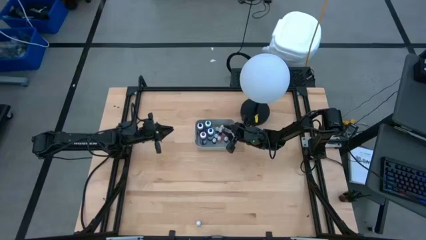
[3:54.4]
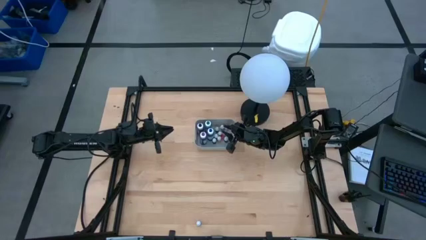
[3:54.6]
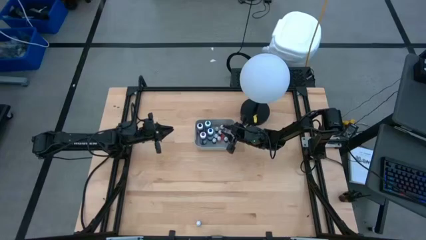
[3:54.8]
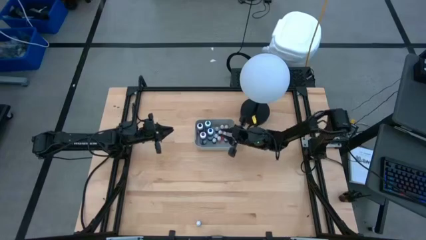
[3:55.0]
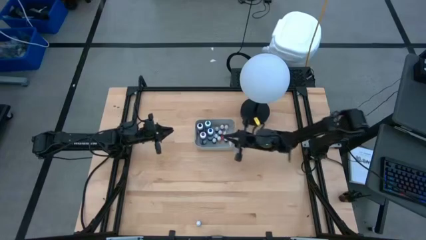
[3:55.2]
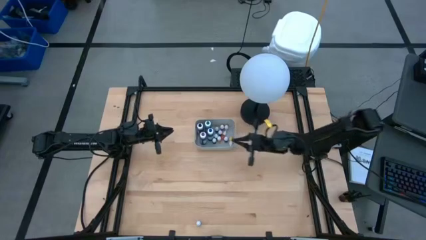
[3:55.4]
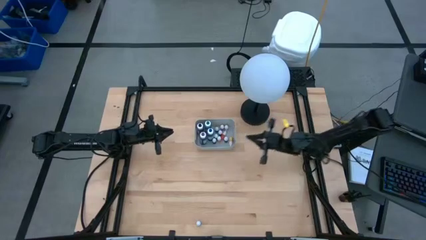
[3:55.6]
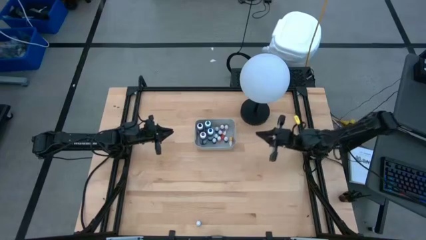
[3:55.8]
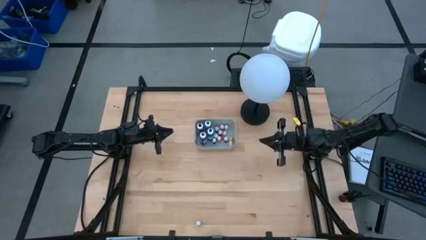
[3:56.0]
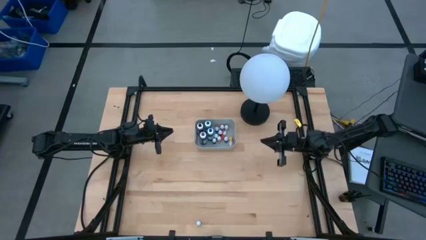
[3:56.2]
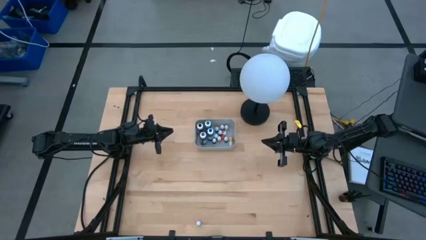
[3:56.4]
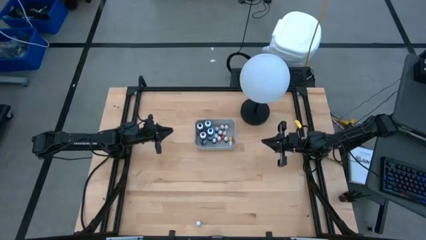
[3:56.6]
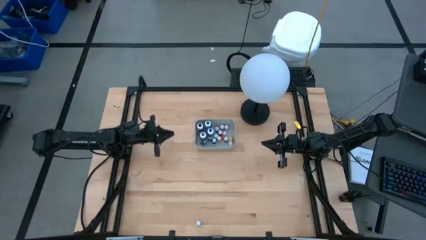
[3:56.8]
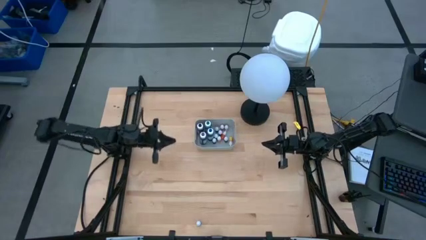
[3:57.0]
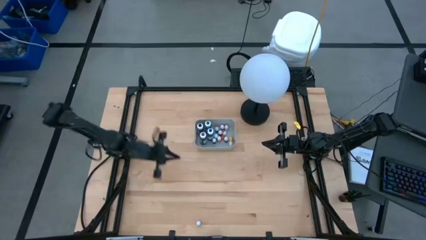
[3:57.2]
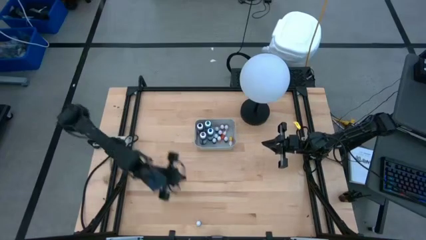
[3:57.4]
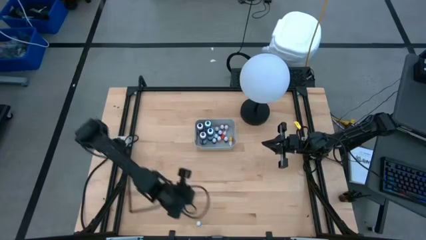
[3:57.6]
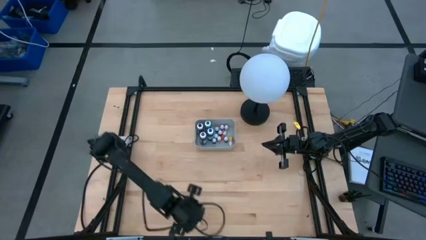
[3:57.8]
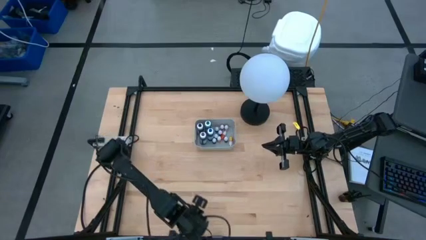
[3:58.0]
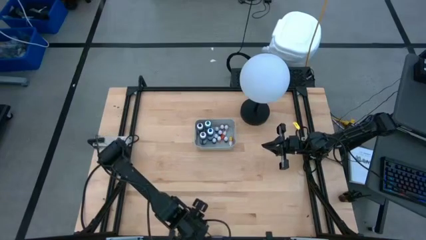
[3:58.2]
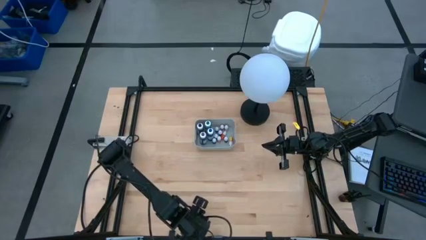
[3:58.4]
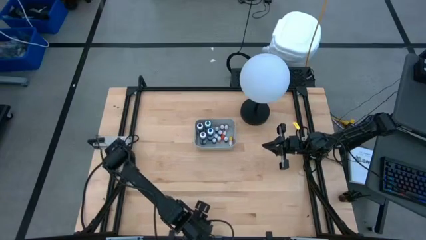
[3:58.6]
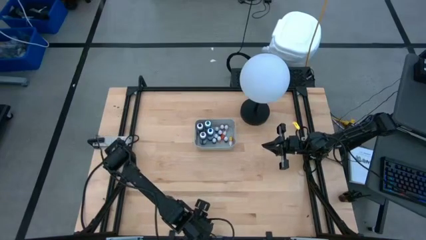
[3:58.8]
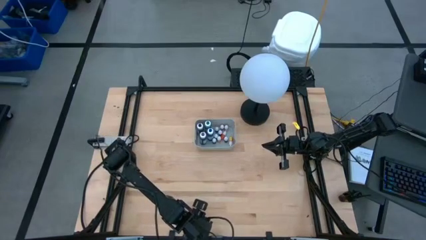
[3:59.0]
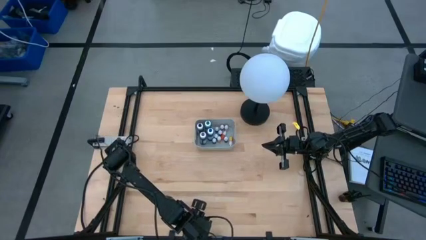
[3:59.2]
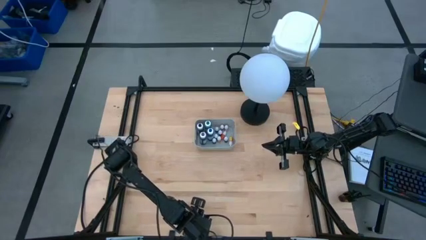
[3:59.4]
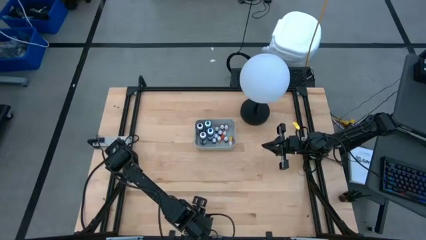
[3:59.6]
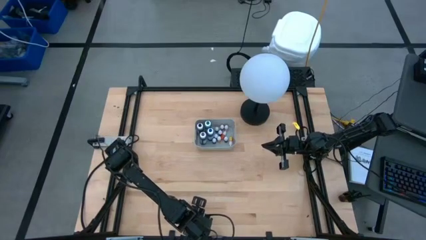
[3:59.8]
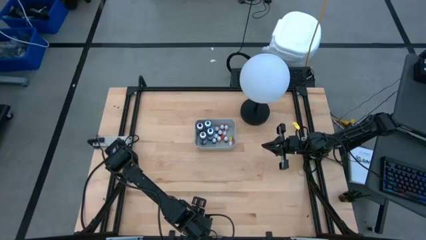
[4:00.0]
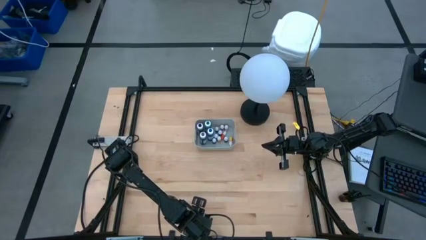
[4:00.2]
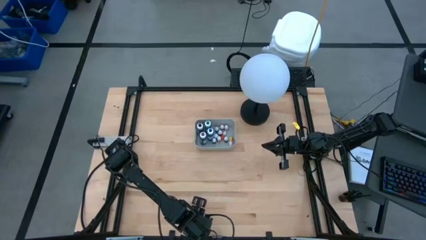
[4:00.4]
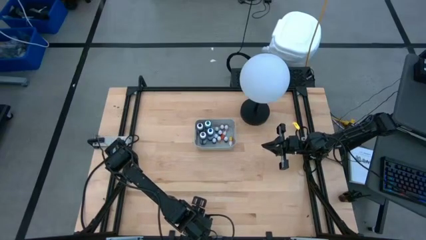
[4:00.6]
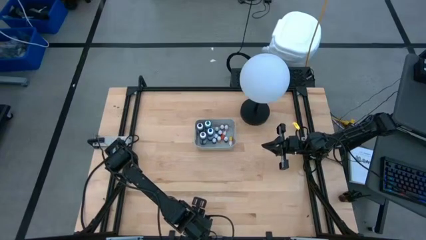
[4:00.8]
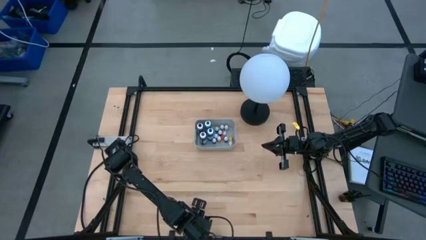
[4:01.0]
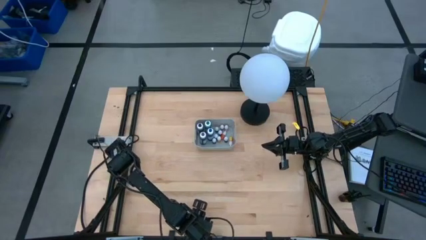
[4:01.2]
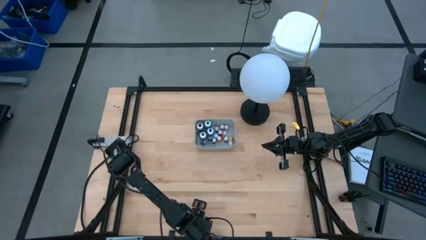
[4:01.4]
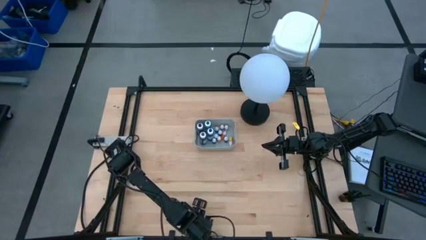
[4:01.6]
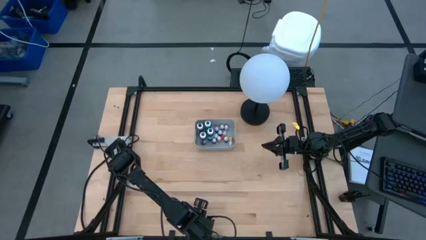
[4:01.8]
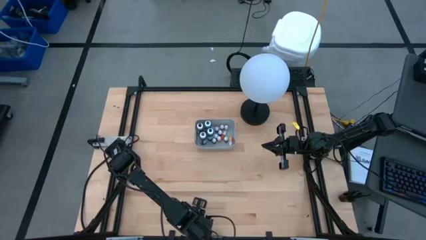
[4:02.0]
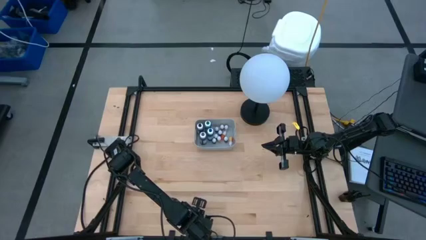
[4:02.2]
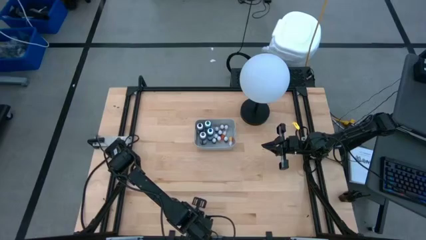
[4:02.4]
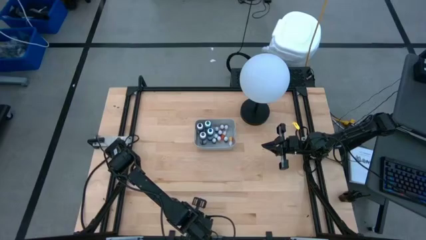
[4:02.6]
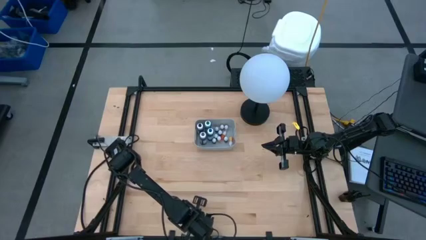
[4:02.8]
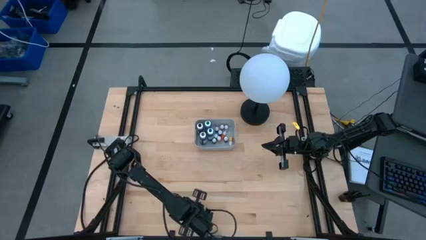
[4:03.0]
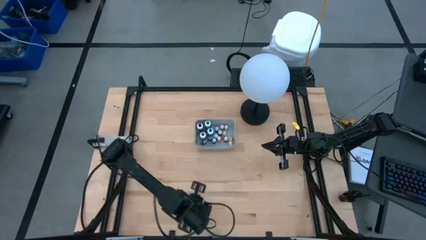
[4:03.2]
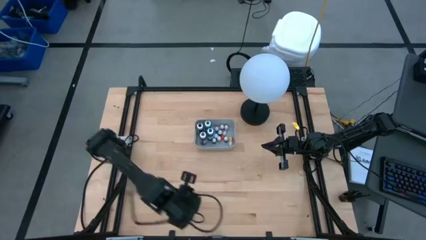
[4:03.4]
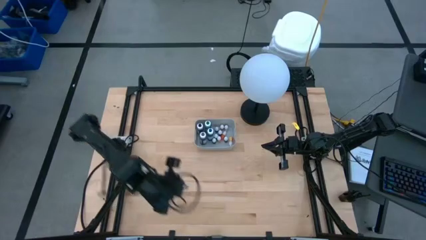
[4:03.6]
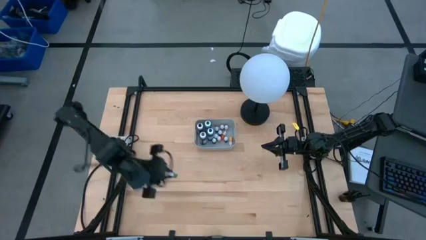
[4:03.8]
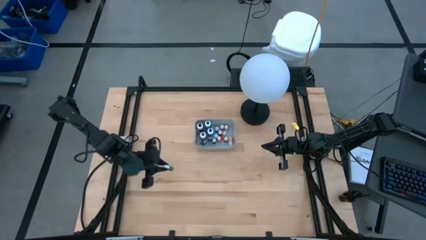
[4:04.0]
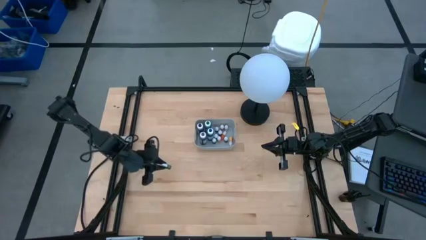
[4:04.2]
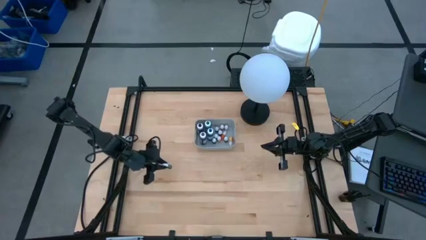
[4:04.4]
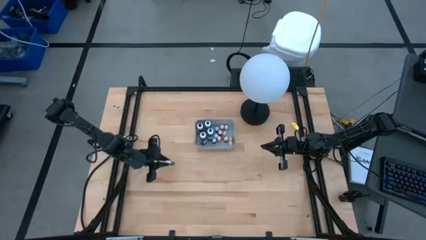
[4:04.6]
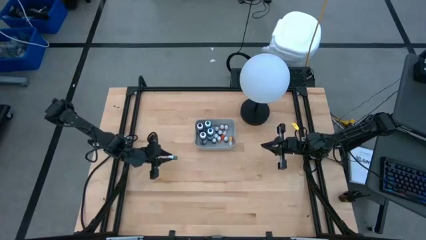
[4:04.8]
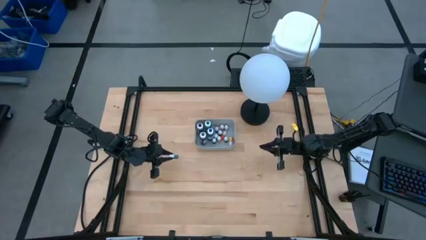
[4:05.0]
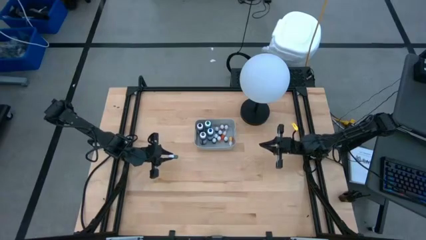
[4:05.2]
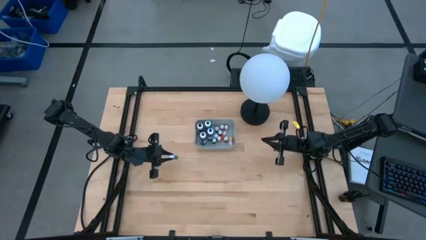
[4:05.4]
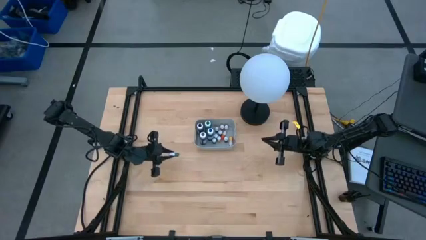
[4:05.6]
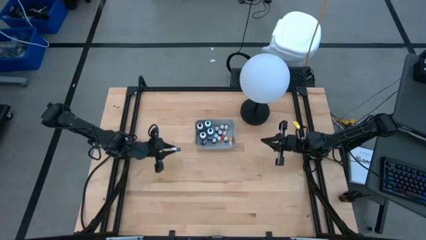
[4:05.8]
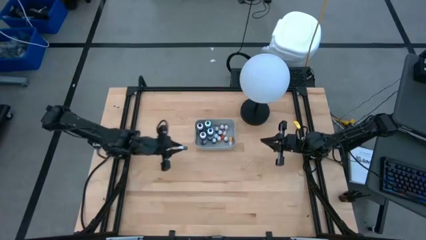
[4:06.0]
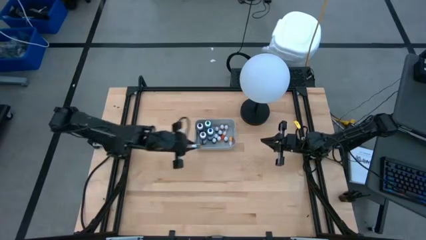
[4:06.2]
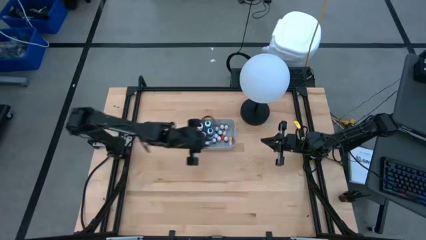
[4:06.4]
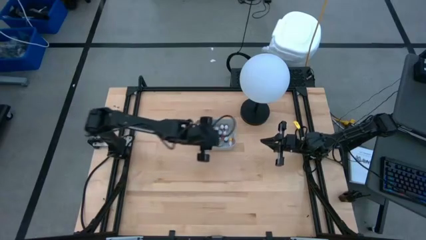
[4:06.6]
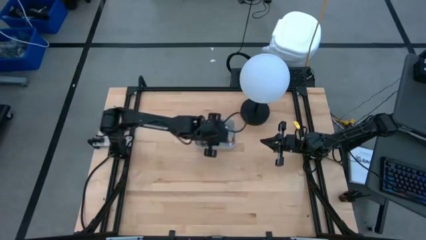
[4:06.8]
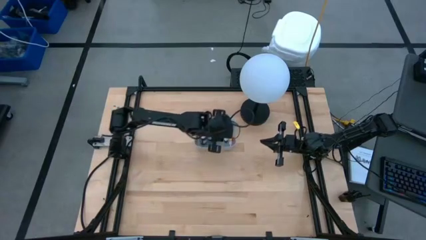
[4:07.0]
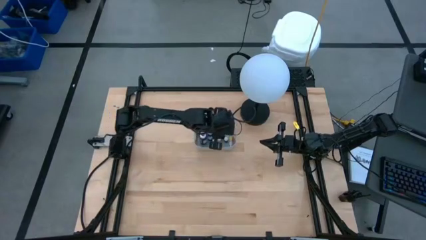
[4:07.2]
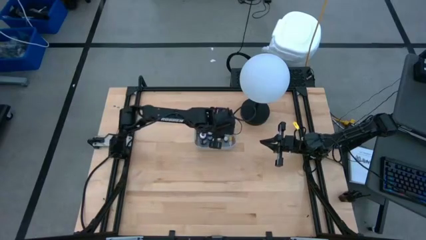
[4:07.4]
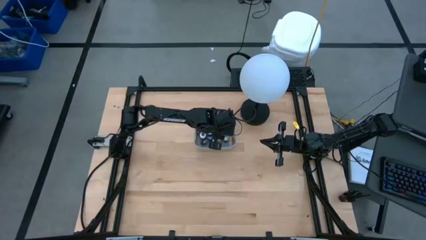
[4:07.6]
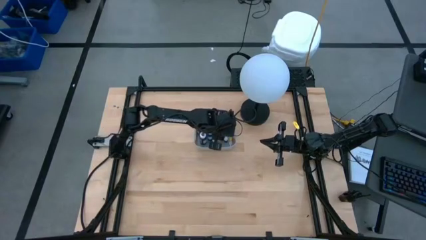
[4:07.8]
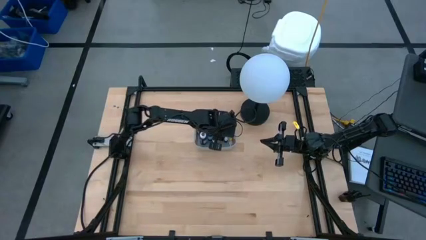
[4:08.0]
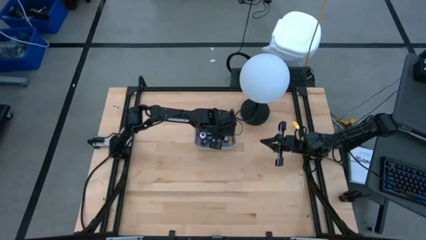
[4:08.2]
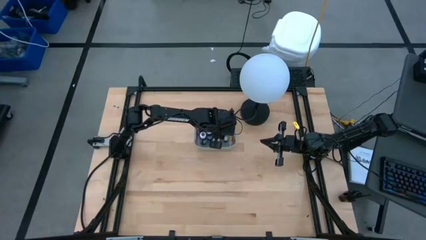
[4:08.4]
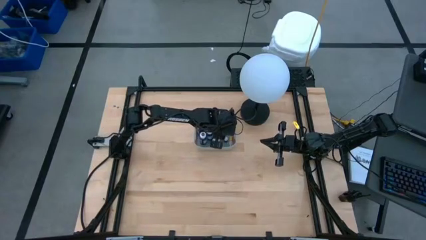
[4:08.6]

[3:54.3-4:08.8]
Task: Pick & Place food coloring
Put the small green food coloring bottle into the gray bin
